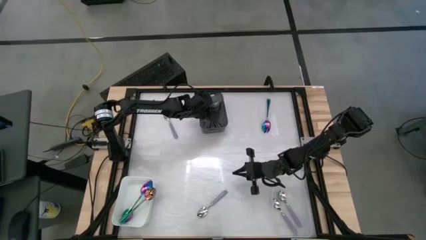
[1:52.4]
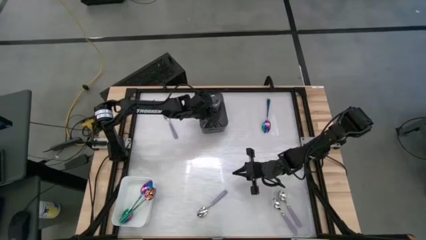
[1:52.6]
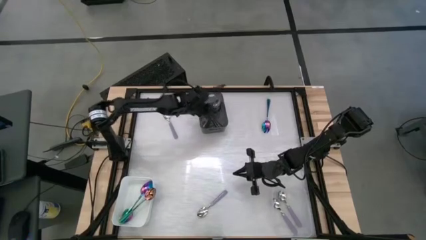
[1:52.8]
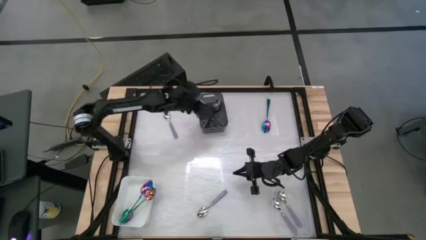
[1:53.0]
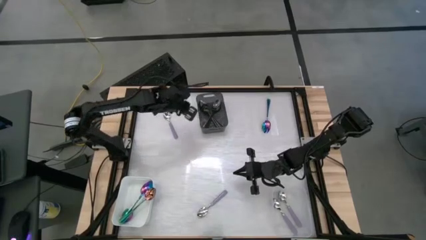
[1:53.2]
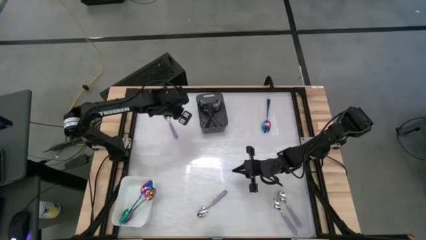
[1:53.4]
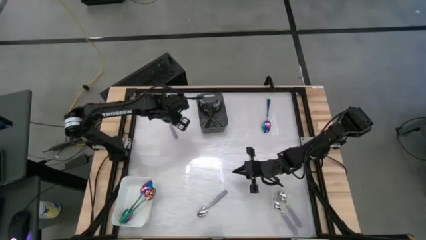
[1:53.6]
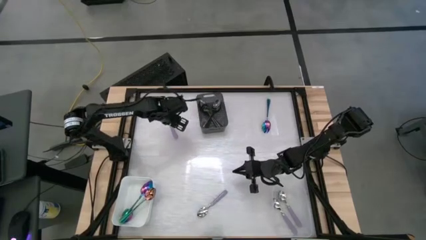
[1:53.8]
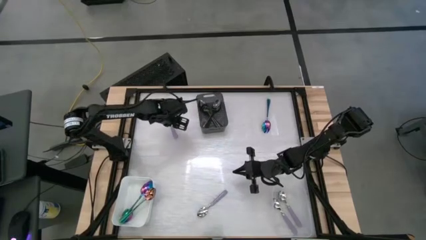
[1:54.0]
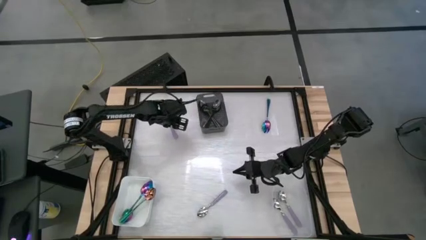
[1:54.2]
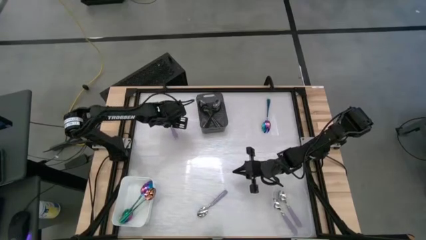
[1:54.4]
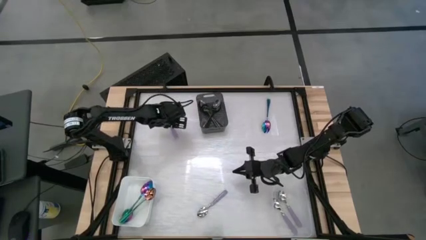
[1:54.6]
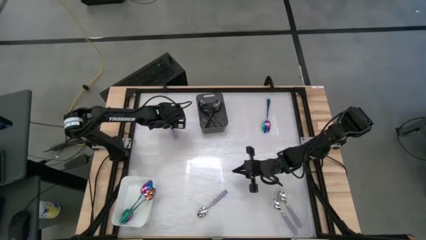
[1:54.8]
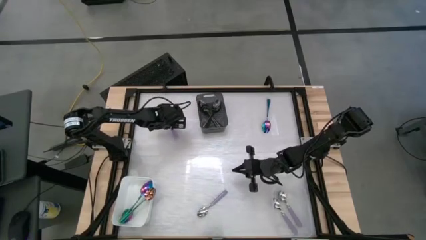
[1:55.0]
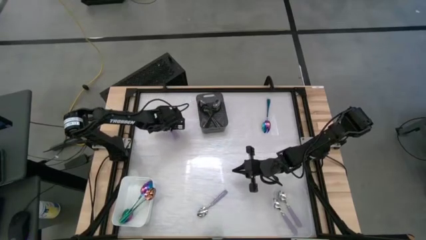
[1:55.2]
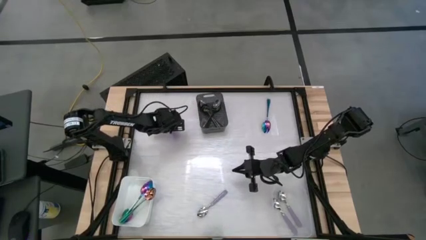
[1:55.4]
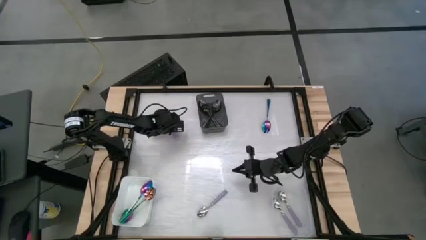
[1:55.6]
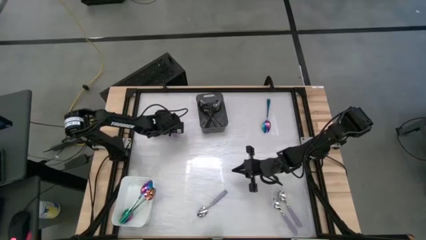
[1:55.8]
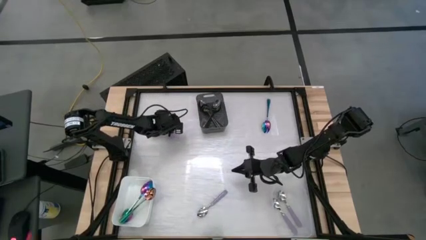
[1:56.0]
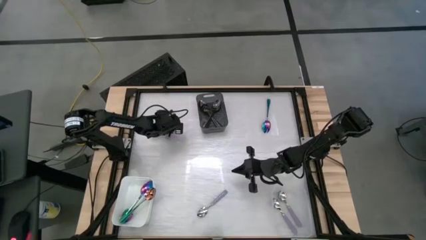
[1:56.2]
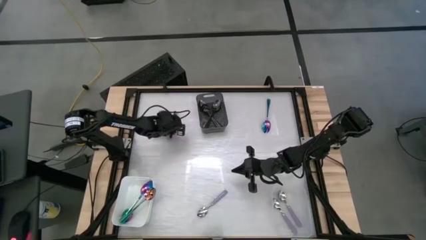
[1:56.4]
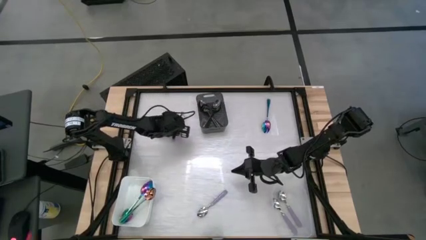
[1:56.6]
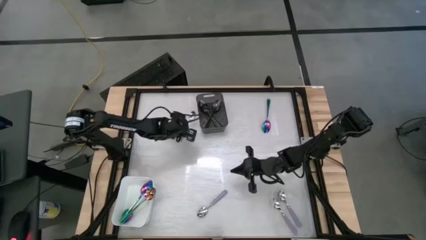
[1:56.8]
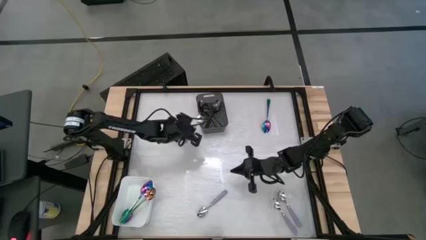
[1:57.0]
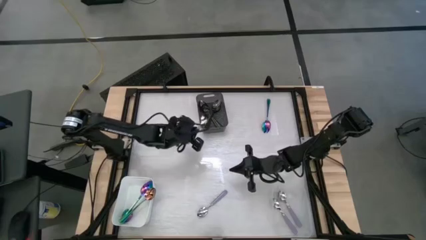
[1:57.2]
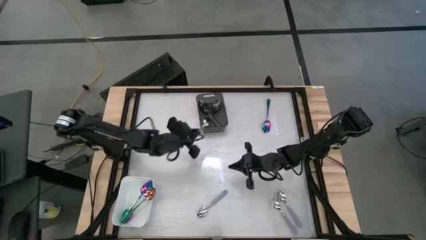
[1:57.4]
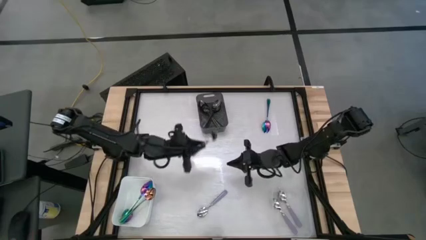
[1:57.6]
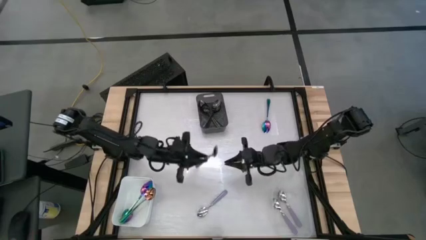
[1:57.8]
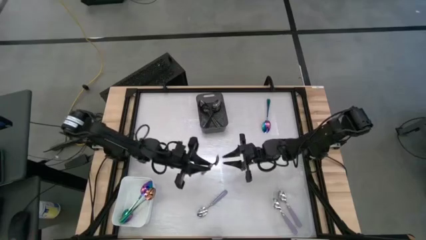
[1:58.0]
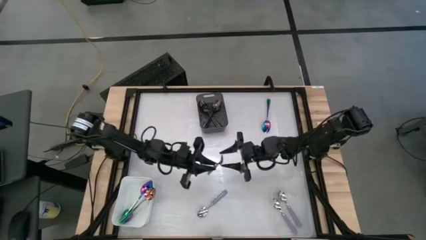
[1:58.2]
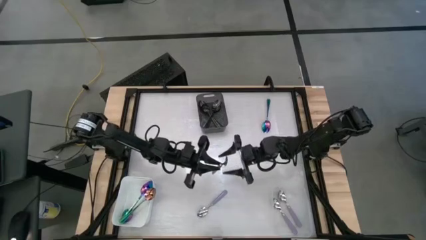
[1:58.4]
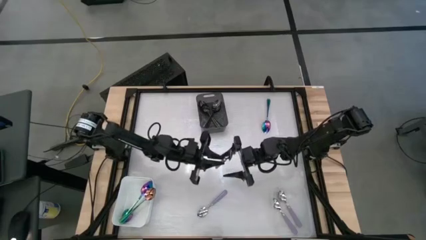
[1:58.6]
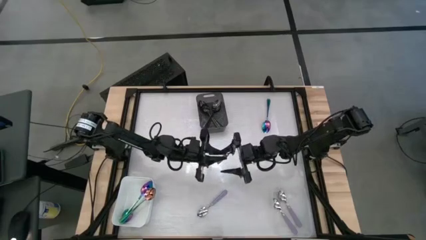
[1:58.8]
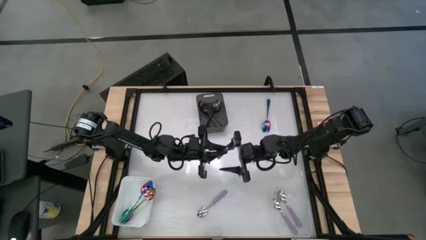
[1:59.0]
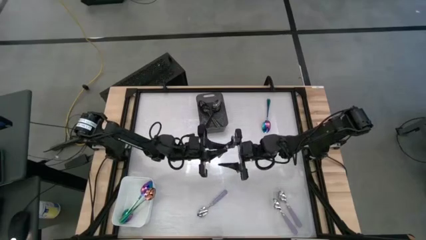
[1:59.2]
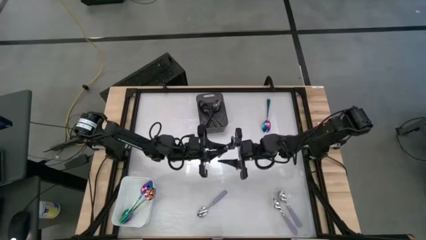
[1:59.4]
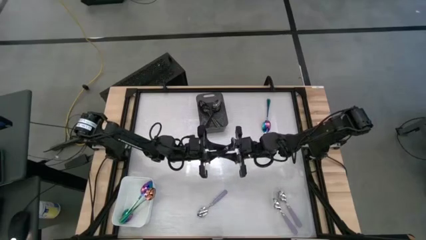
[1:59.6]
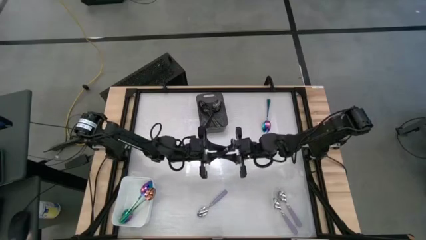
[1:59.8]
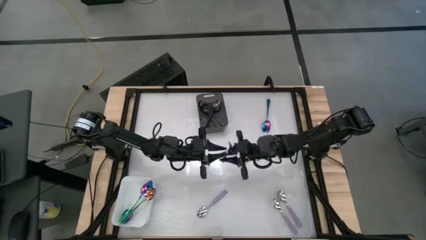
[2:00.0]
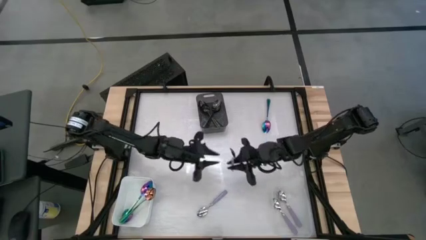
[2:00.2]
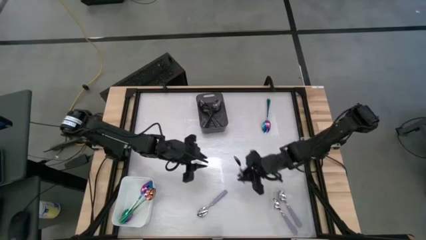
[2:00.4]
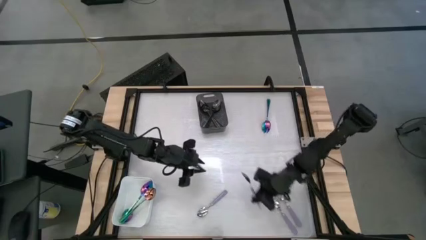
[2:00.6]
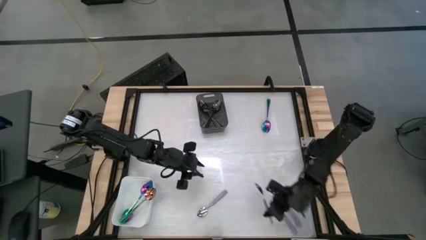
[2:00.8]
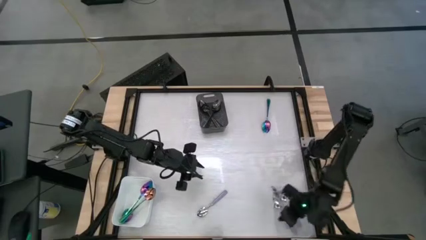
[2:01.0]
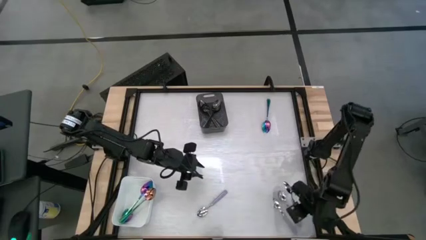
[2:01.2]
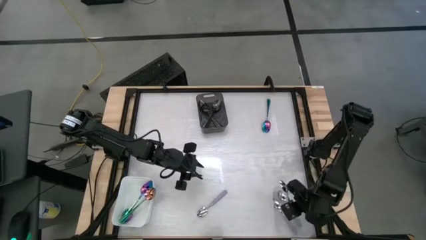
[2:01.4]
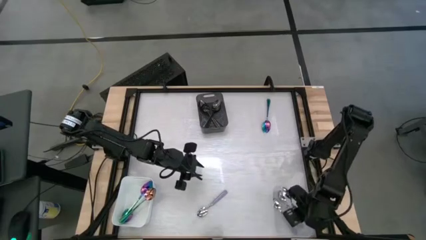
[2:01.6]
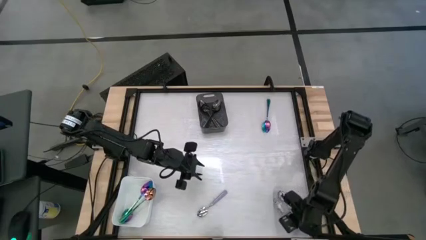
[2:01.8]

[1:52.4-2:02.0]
Task: Sort silverware by color (type)
Put the purple spoon into the transparent bin
